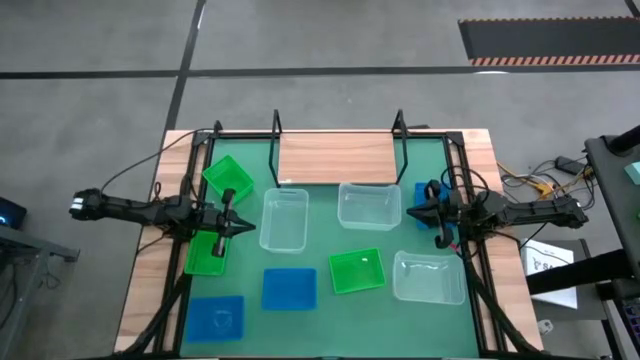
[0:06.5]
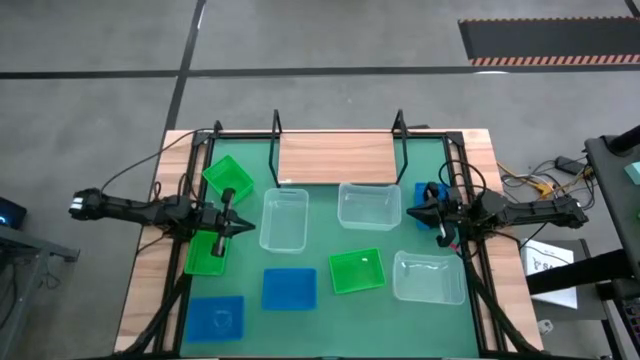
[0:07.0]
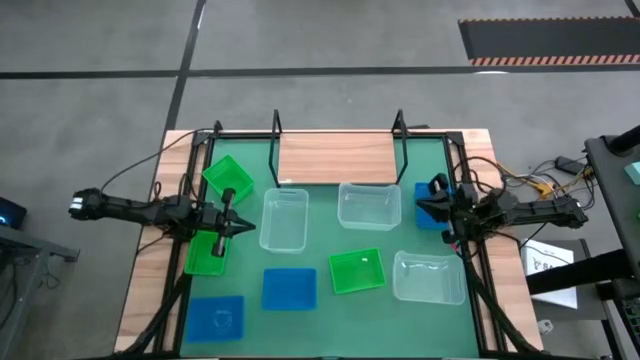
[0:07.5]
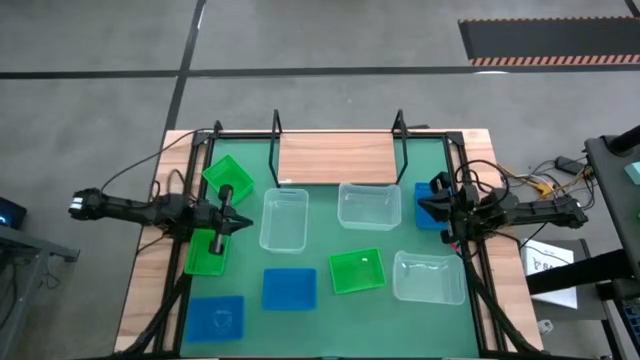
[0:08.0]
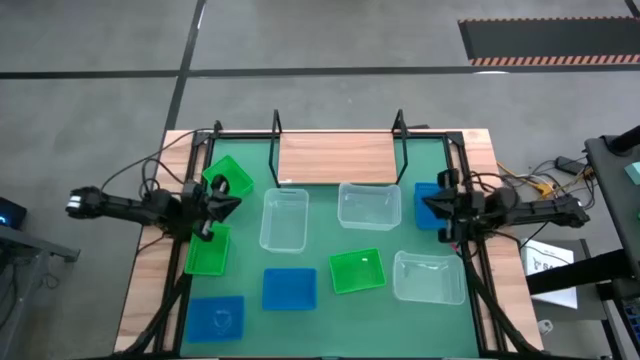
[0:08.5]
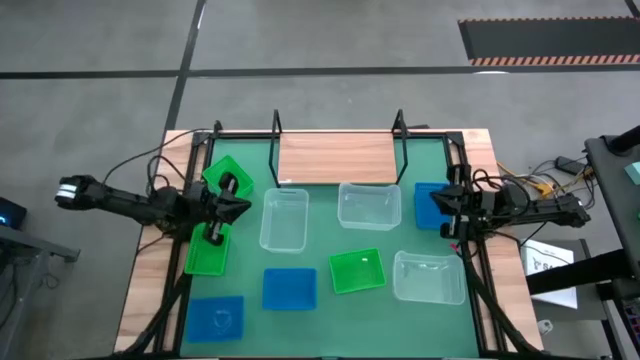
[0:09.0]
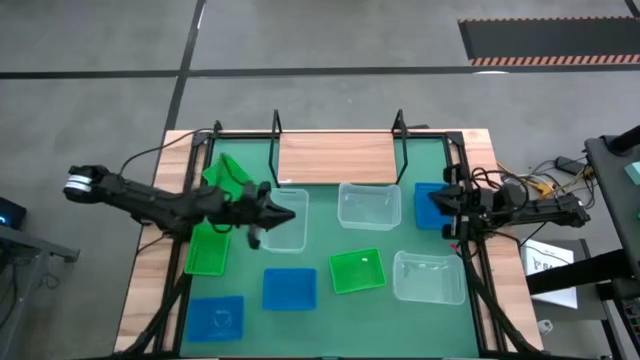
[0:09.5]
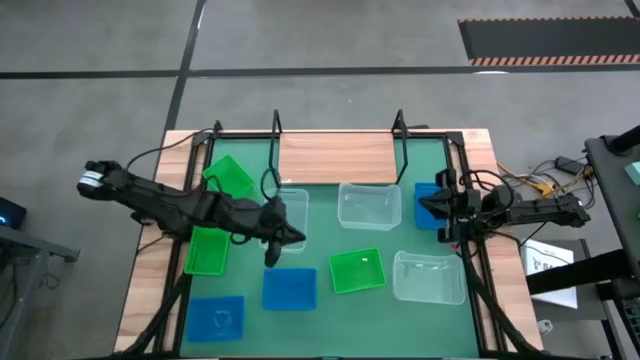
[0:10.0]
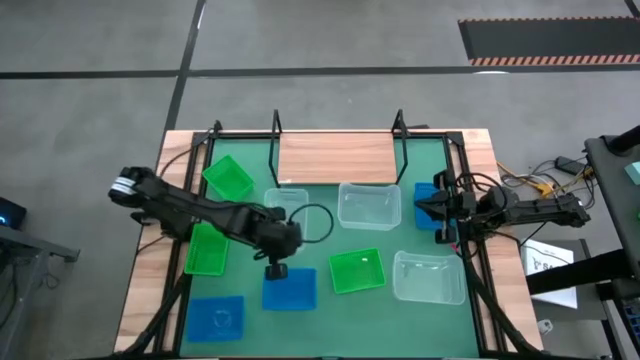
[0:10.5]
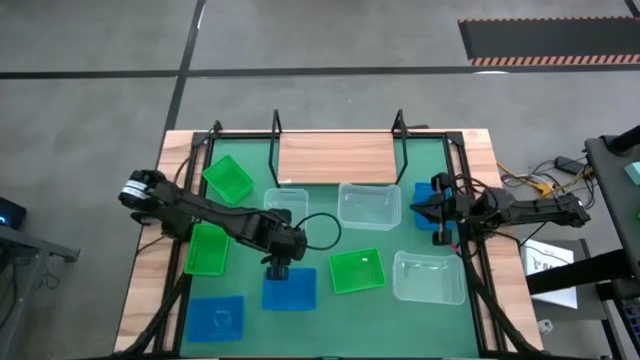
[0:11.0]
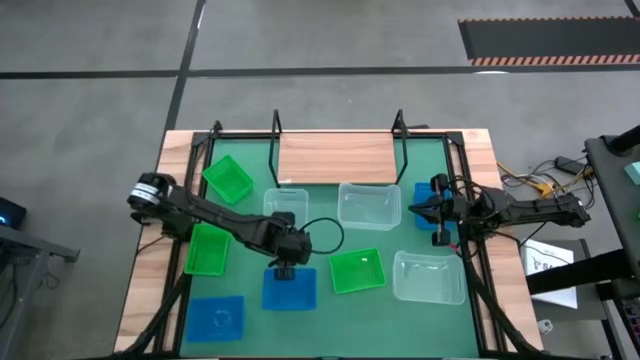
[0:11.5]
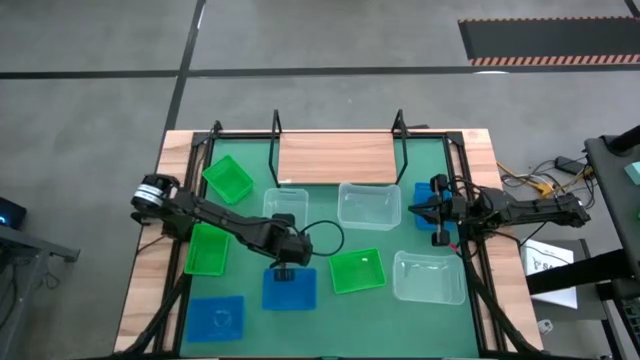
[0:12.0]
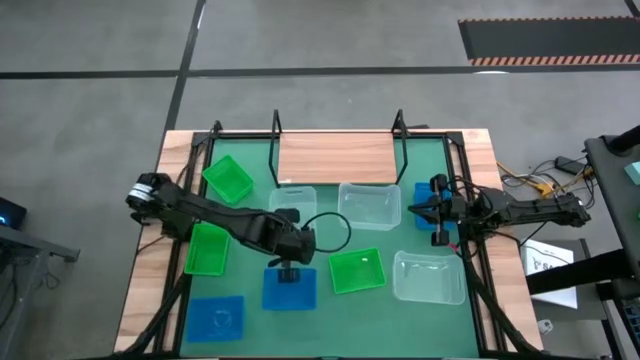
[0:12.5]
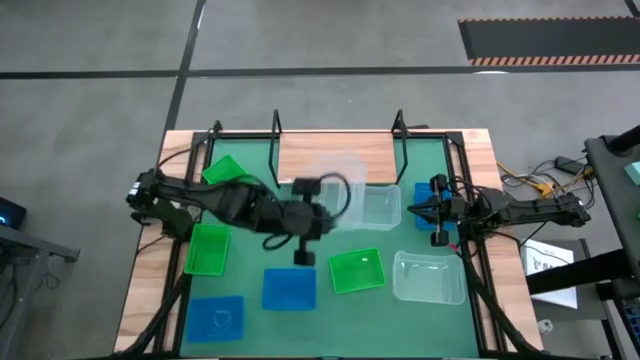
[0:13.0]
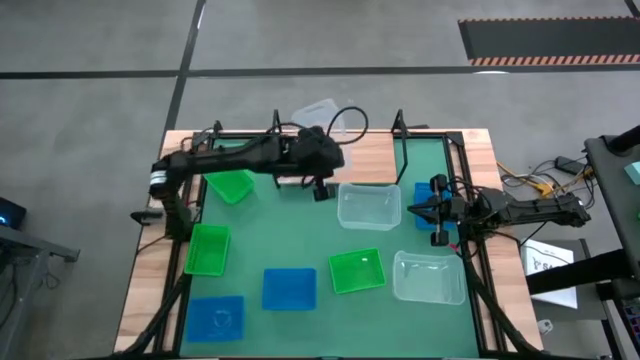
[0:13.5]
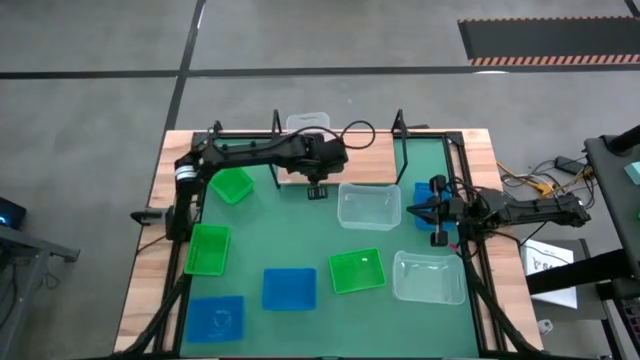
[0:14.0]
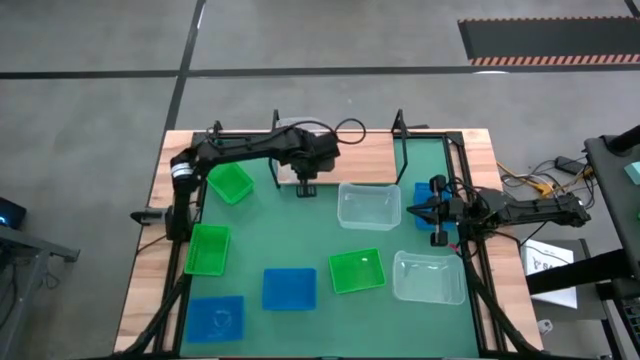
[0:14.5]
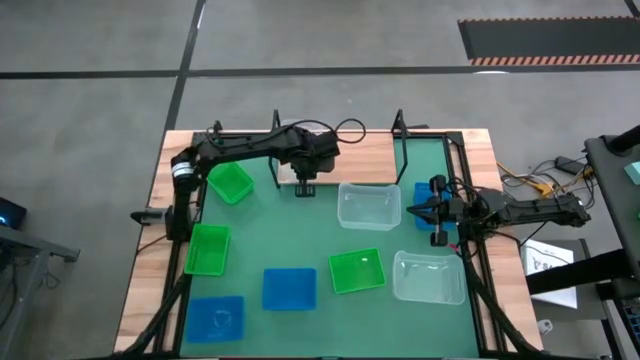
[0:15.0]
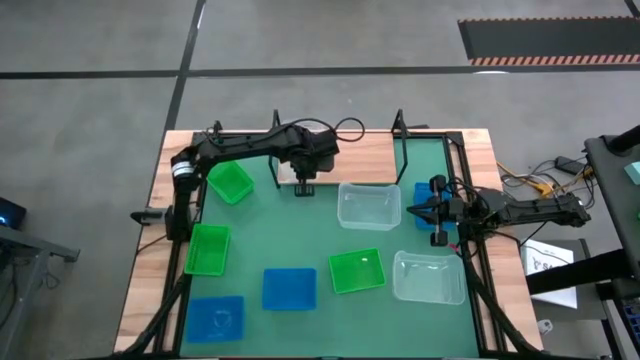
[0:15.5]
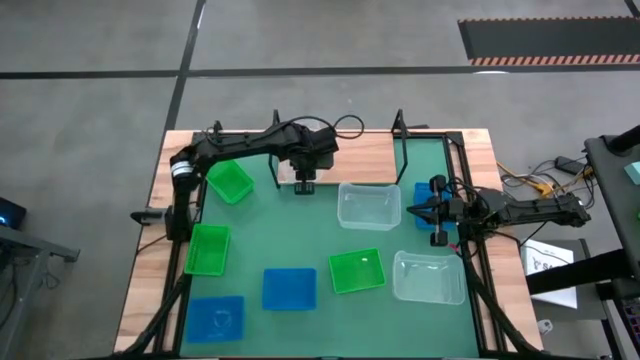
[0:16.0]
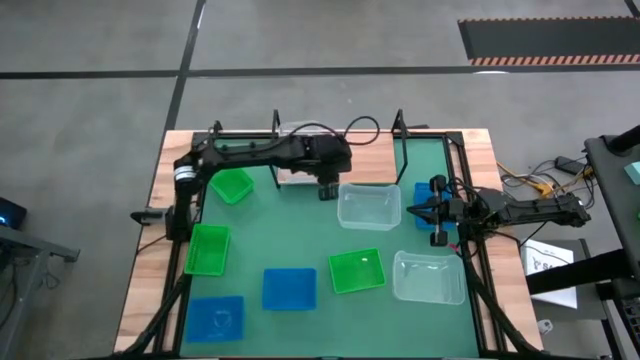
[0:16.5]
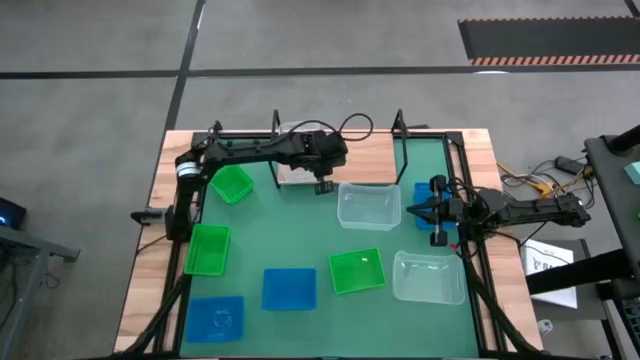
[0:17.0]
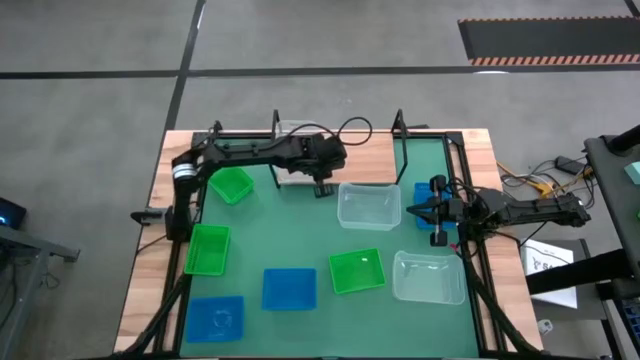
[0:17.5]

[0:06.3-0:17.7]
Task: Stack baskets on shelf by color
Put the top left transparent bin on the shelf

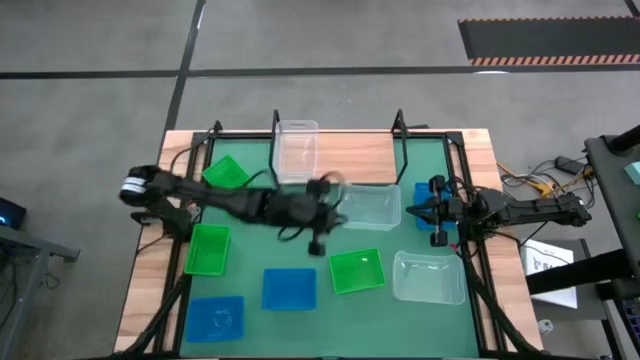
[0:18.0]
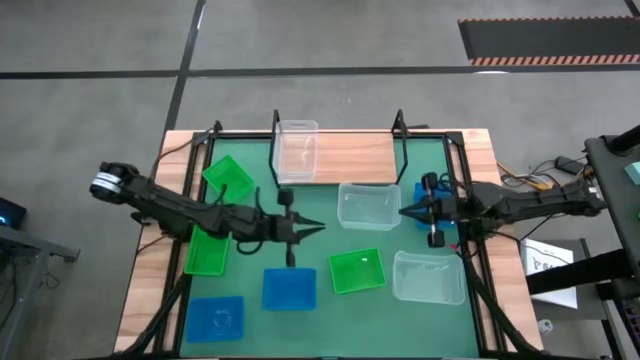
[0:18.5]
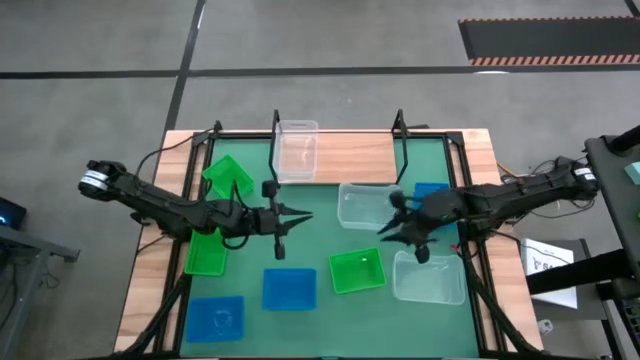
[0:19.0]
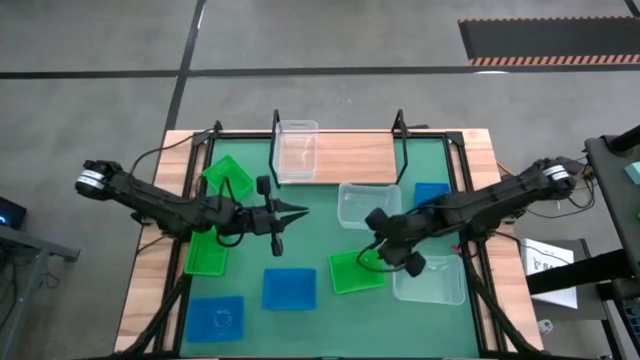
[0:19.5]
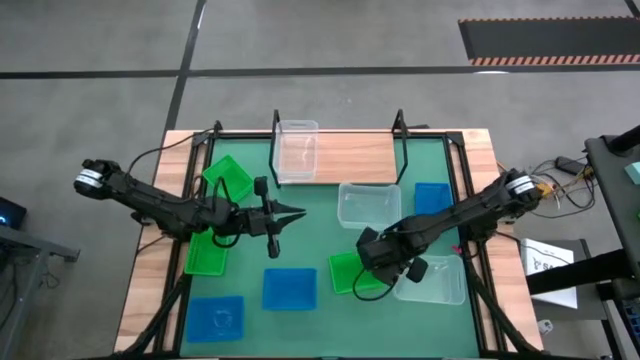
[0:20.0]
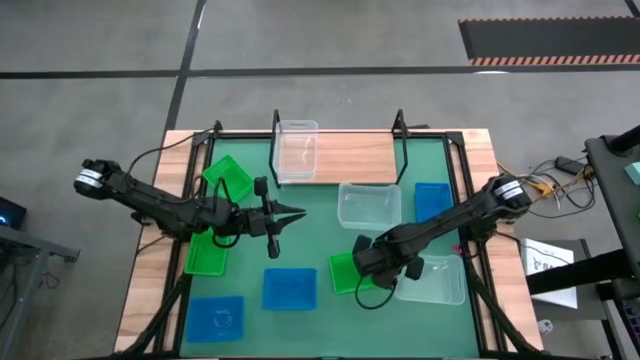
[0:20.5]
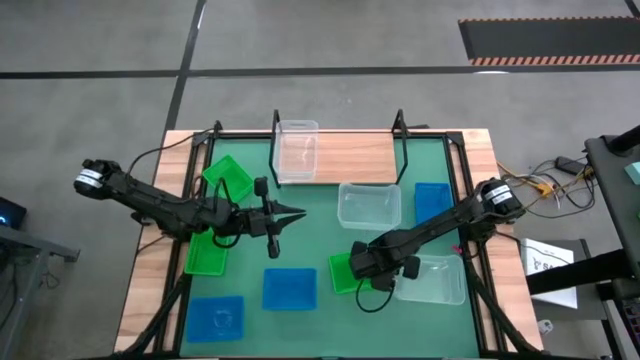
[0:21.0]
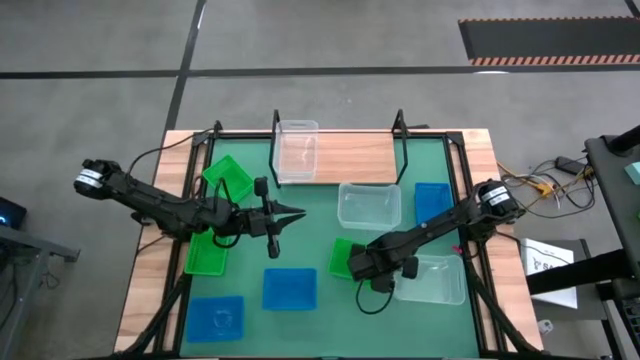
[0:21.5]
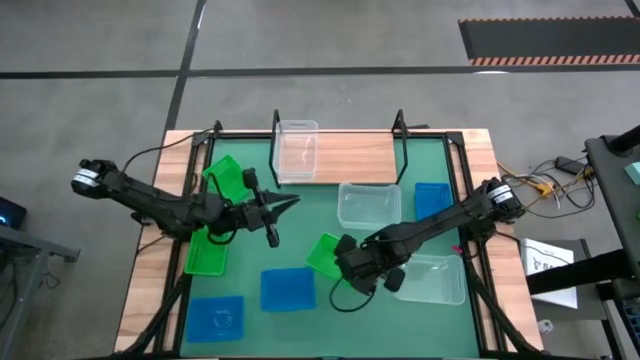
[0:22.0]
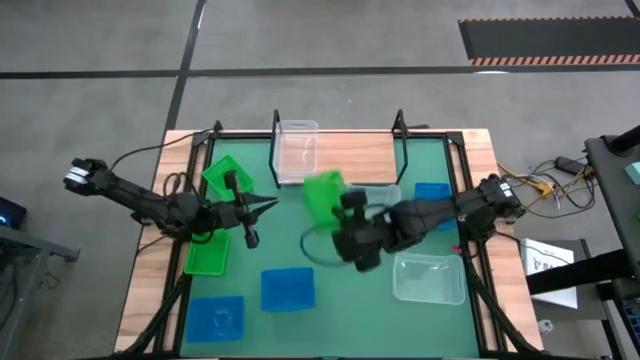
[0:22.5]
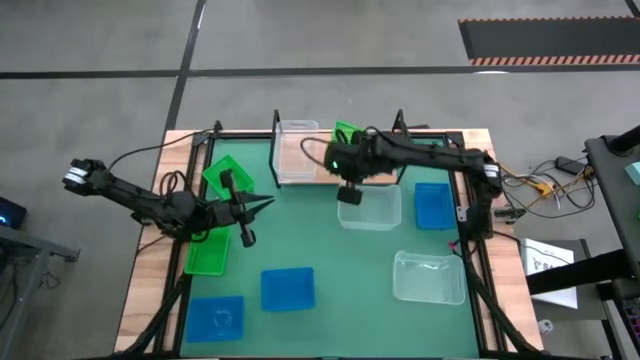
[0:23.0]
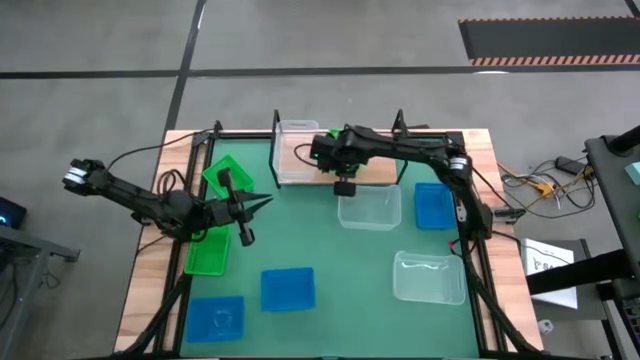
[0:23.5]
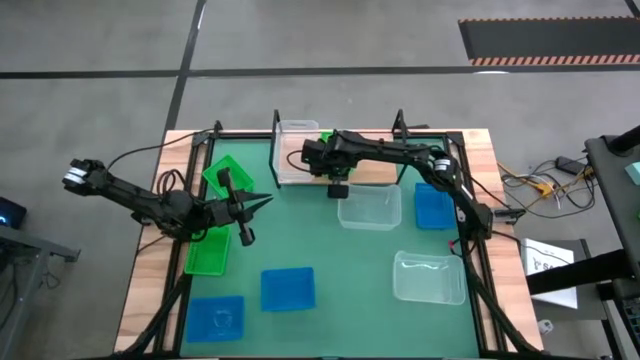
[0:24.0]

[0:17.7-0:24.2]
Put the bottom right green bin on the shelf

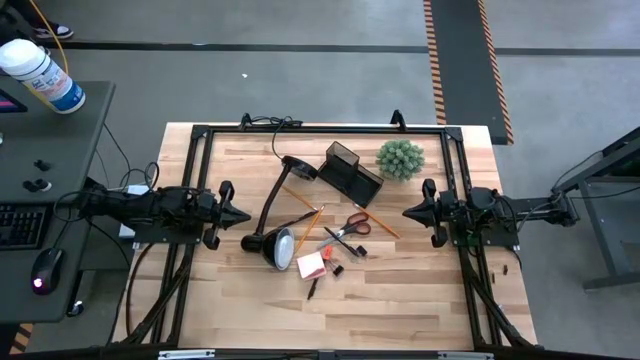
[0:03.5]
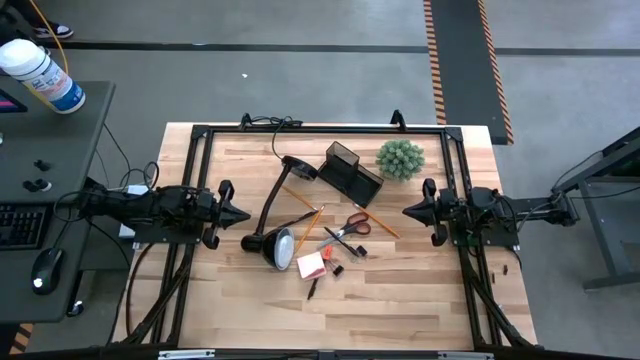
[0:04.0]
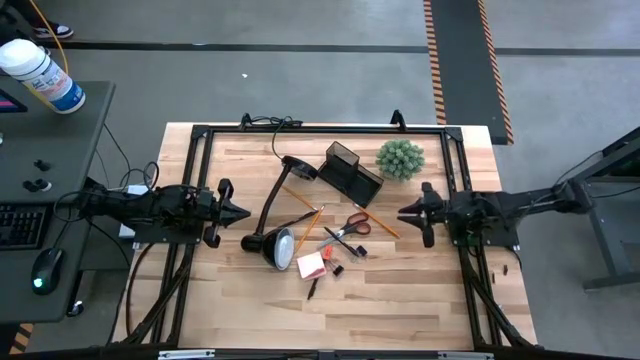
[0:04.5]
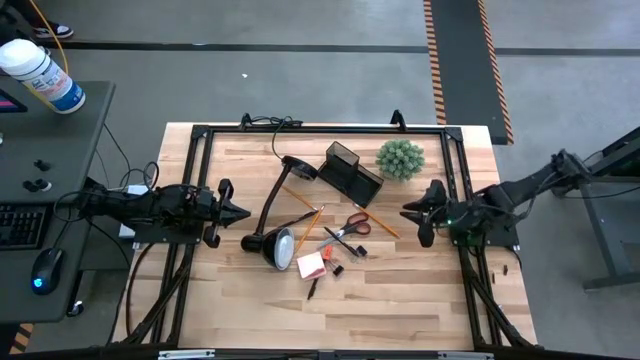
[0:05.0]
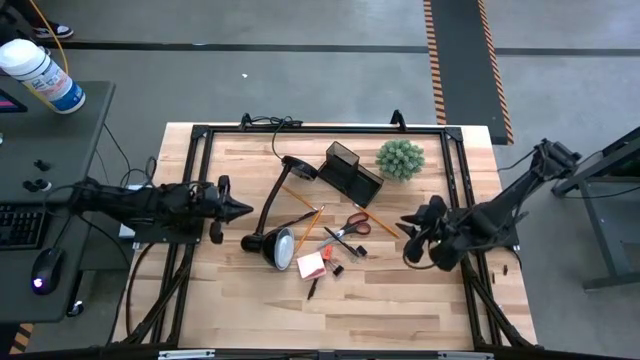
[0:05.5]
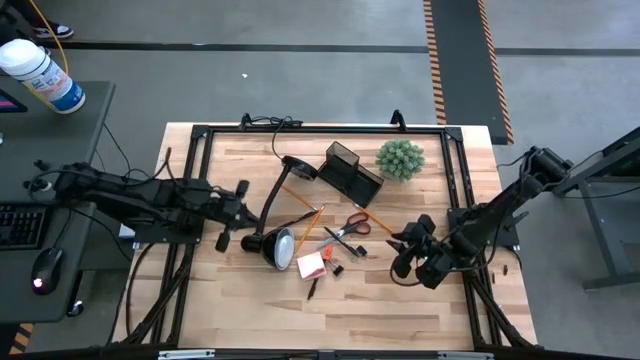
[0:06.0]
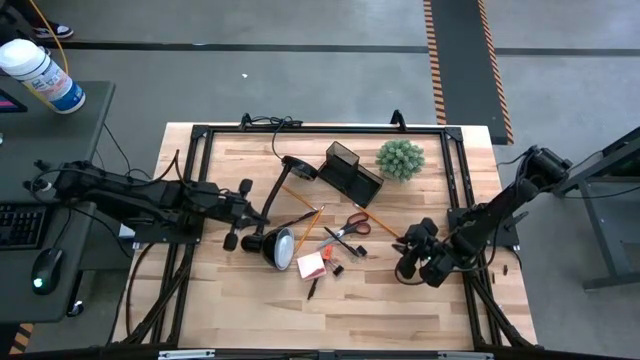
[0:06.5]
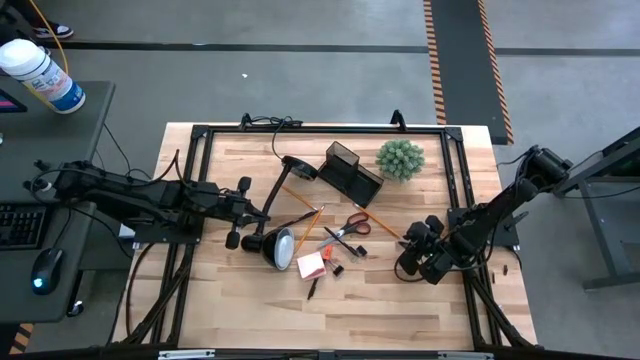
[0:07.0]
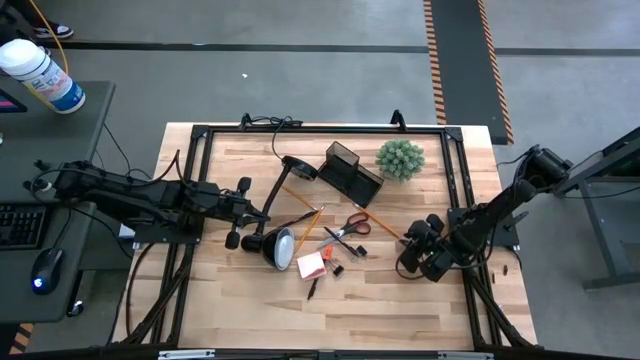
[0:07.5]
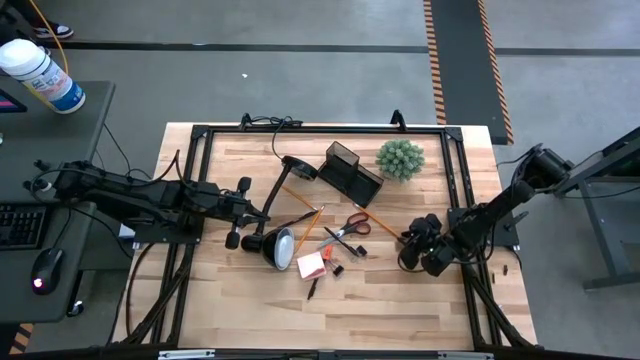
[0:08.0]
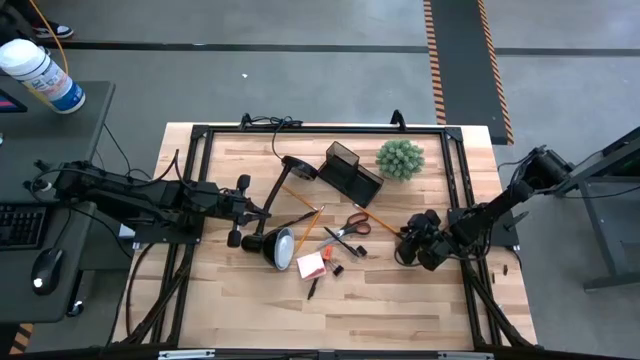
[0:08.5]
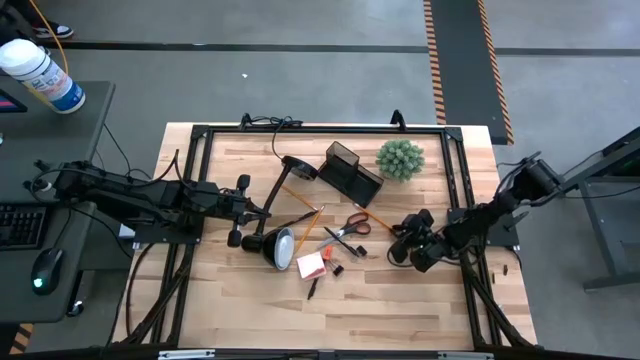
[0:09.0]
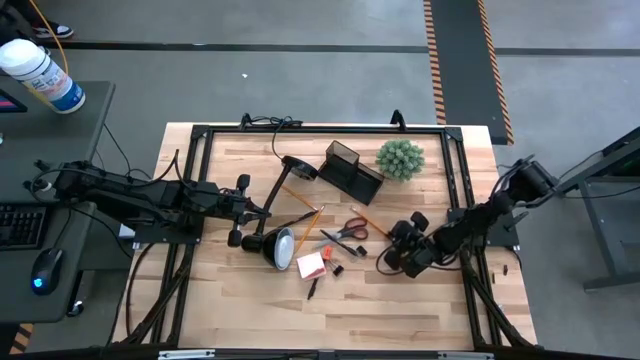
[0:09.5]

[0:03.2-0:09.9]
Task: Pick and place office supplies into organizer
Put the right orange pencil into the desk organizer
